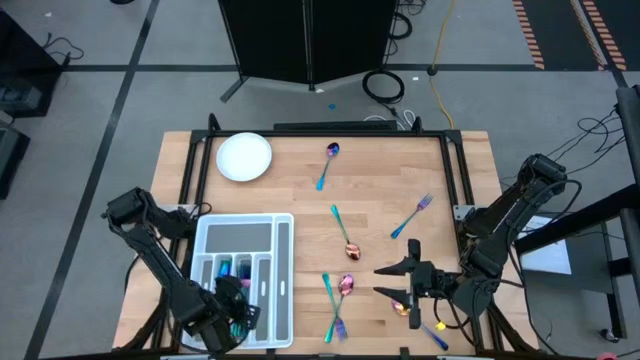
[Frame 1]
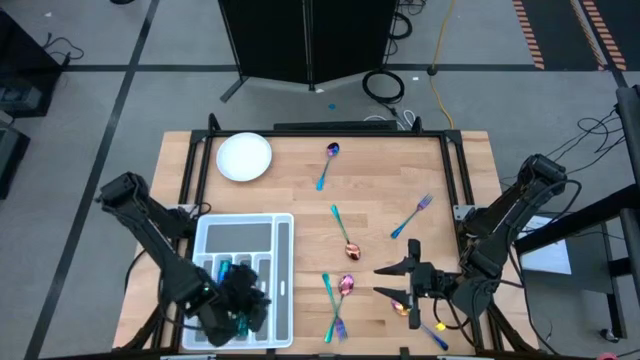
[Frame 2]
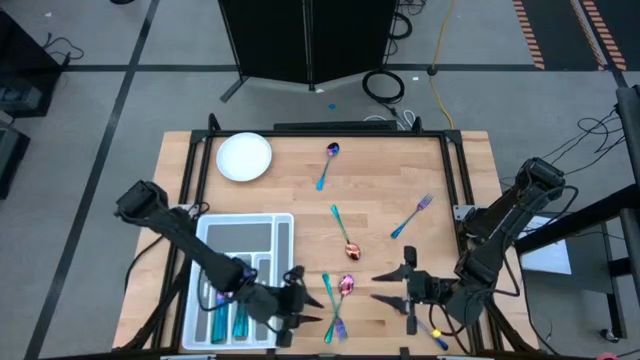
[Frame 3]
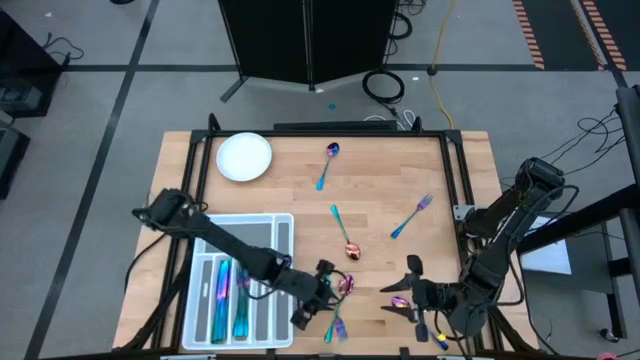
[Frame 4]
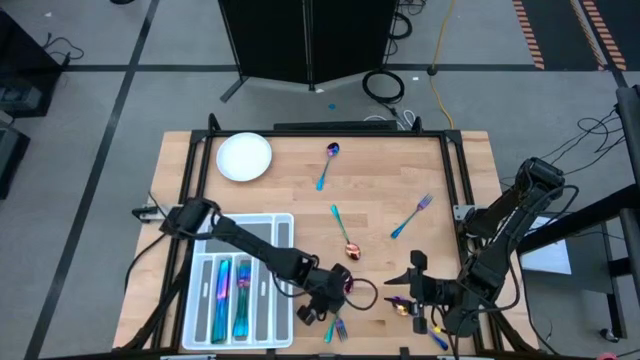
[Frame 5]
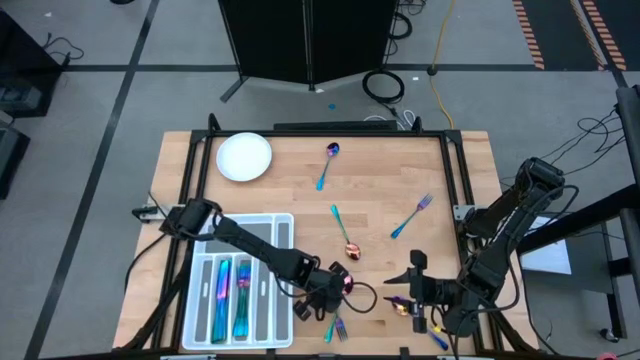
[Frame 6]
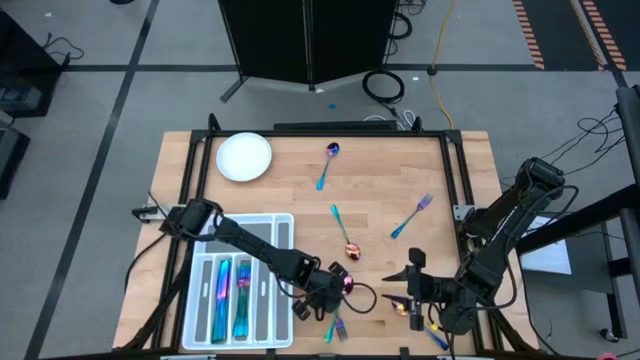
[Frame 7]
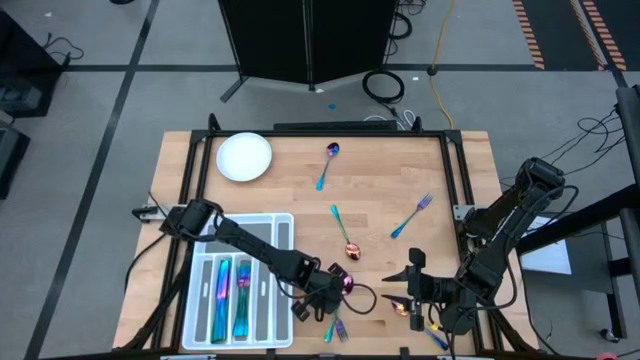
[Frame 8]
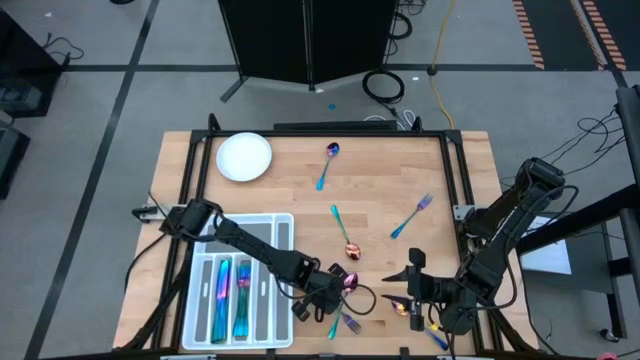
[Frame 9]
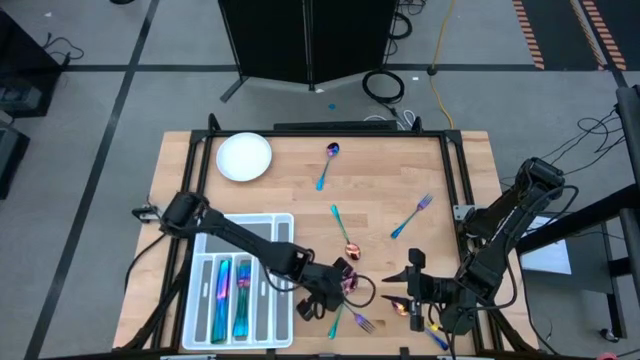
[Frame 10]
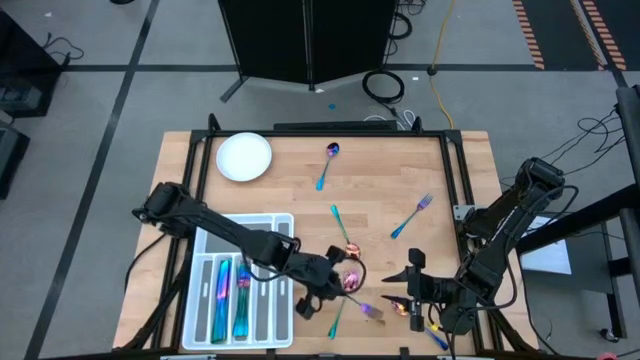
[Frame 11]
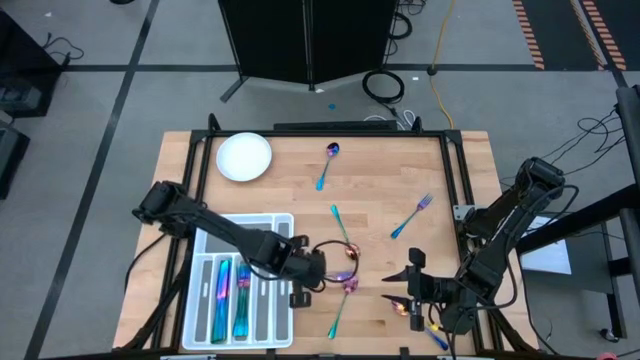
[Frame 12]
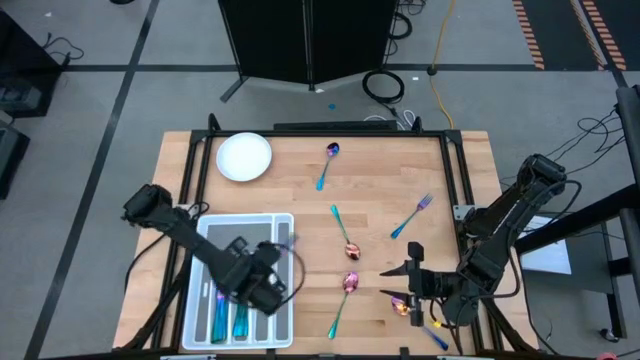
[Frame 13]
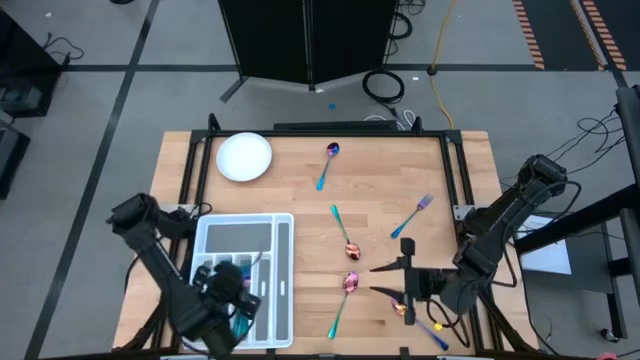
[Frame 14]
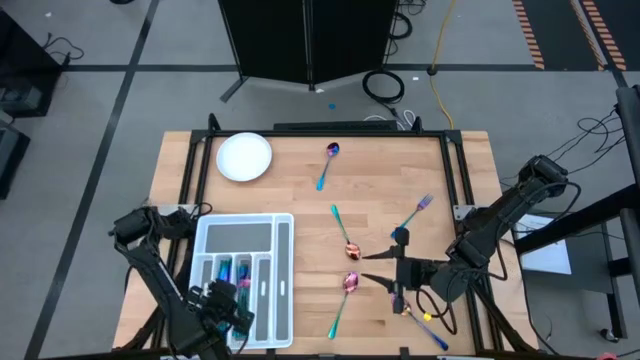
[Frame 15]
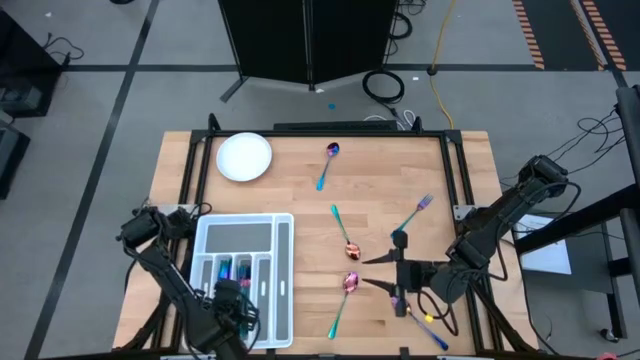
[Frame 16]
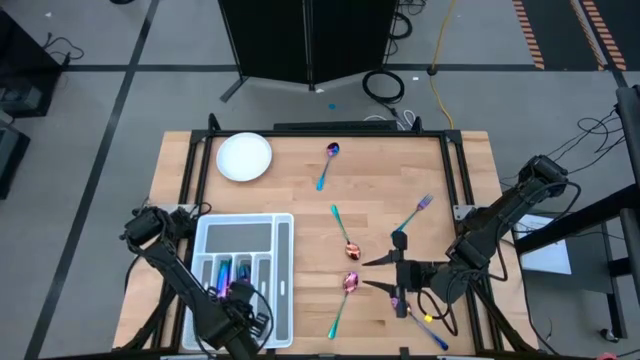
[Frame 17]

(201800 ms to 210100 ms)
Task: Sort silverware
Put the iridescent blue fork in the silverware tray

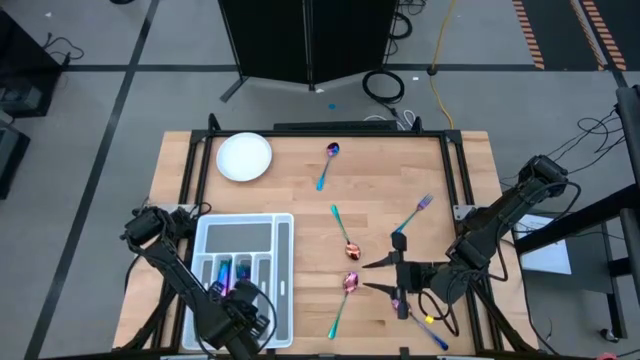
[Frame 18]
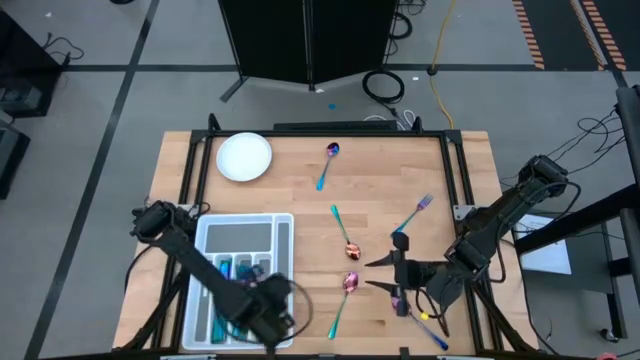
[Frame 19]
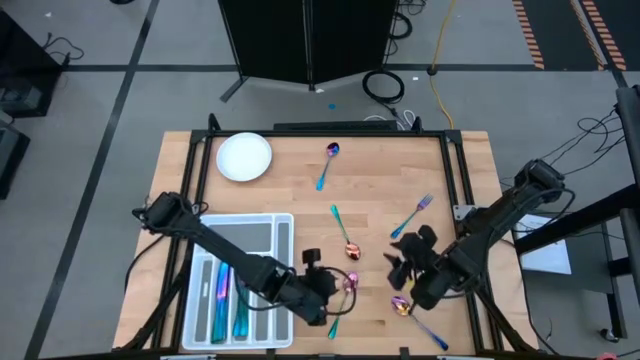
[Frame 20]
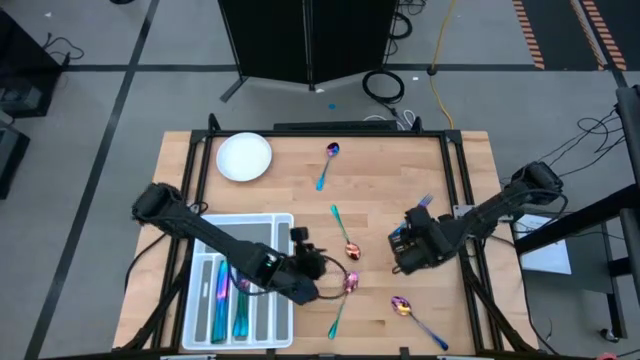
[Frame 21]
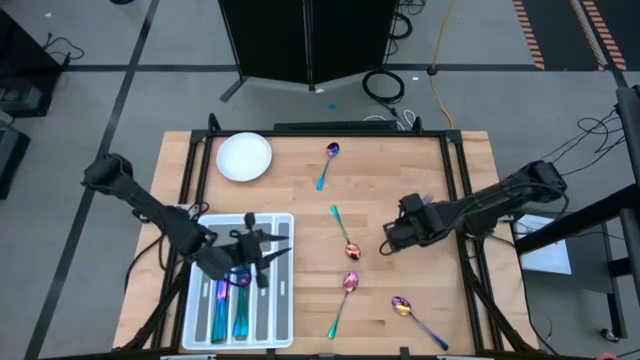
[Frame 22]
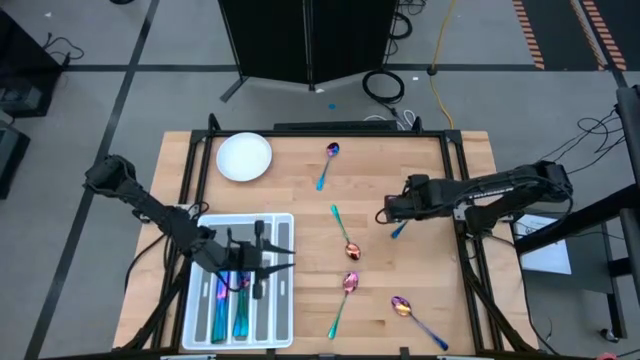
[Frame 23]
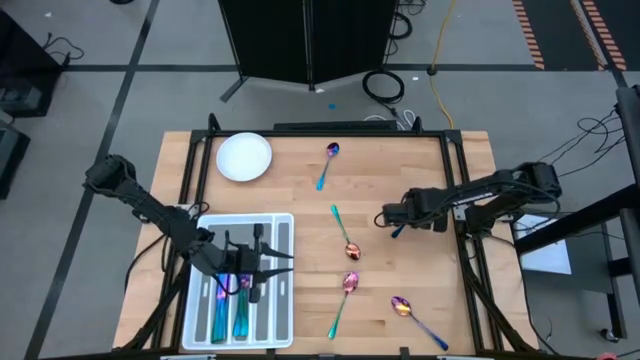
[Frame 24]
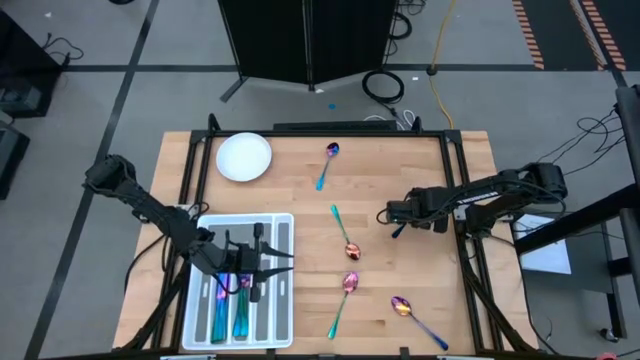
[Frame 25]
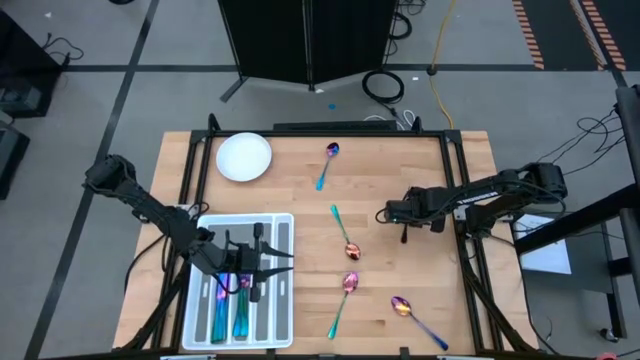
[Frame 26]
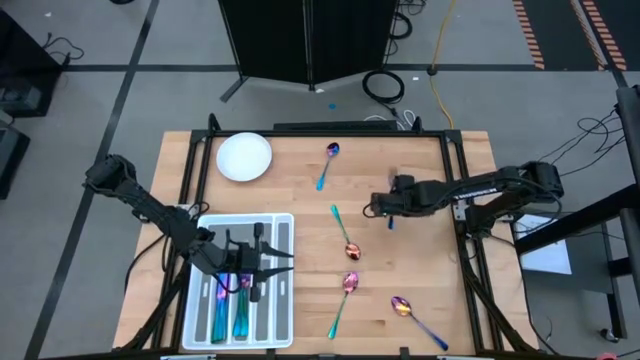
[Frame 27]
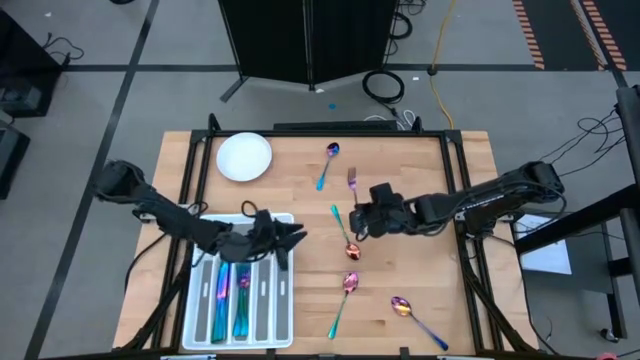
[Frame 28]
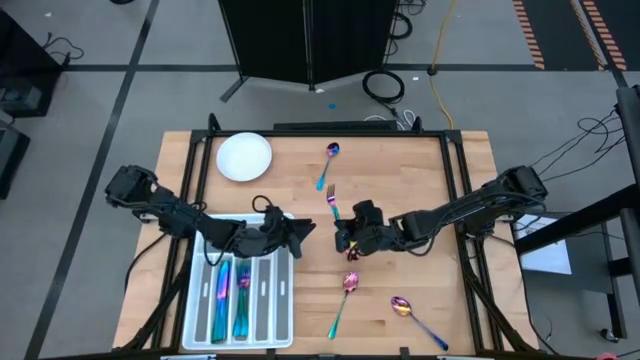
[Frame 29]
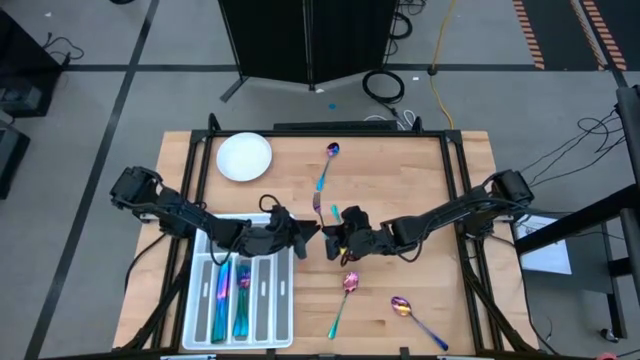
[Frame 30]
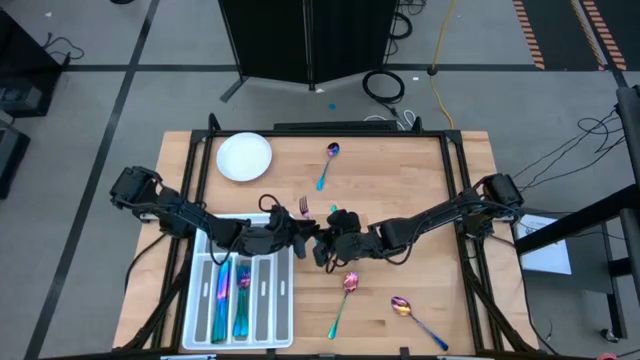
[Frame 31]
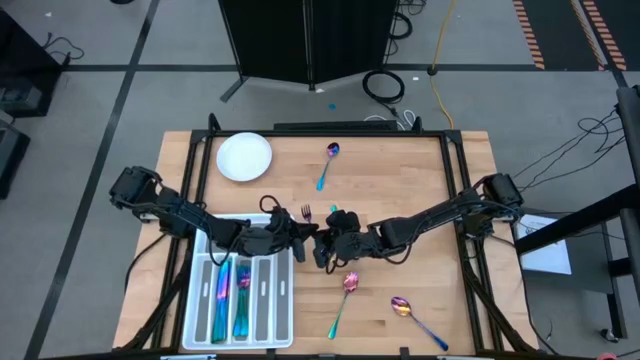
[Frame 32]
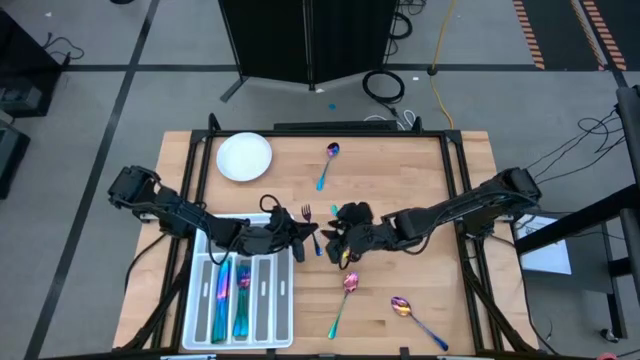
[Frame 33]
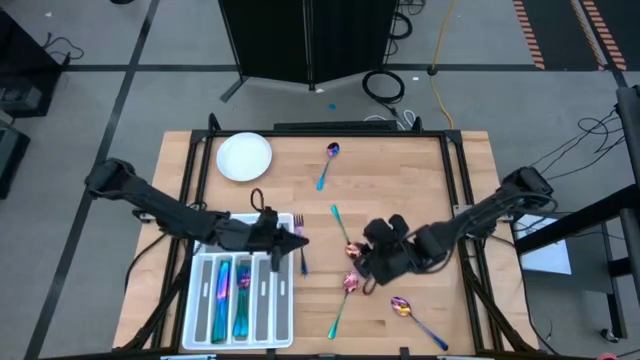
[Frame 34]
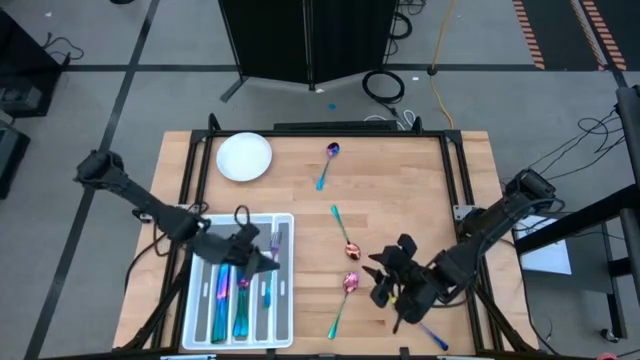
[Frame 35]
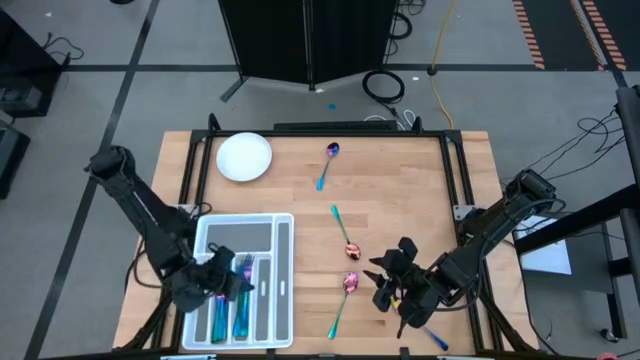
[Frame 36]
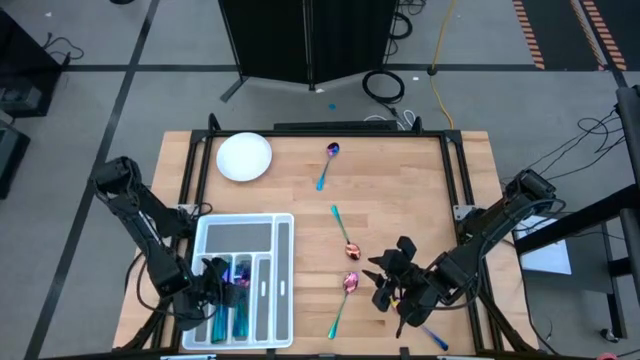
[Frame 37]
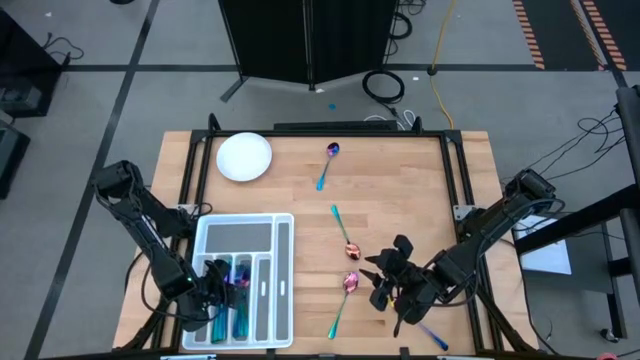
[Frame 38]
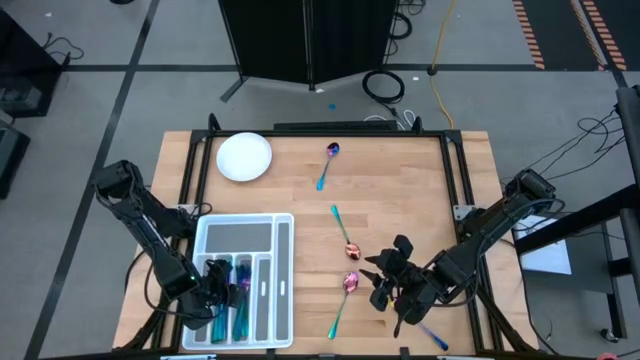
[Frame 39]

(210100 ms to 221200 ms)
Put the iridescent blue fork in the silverware tray

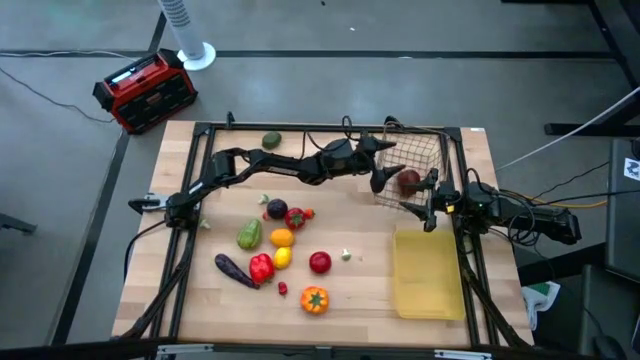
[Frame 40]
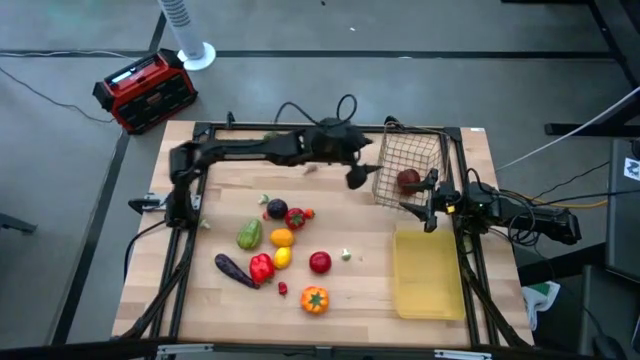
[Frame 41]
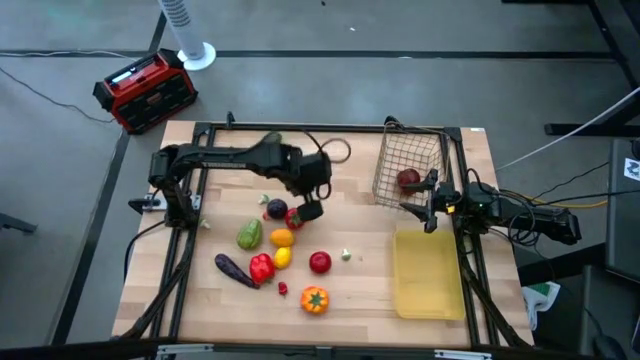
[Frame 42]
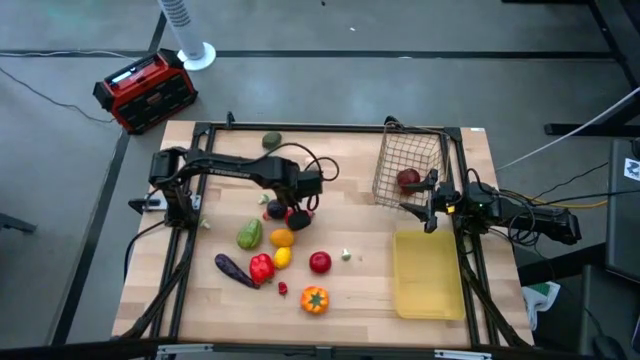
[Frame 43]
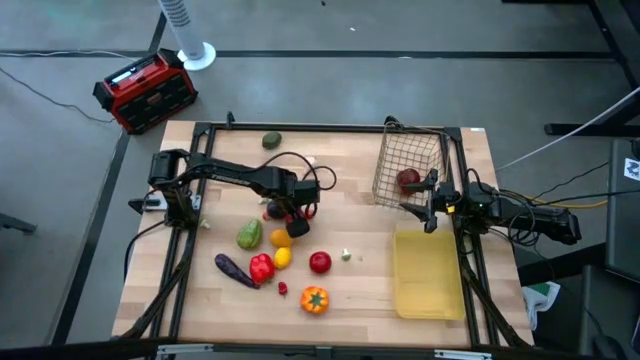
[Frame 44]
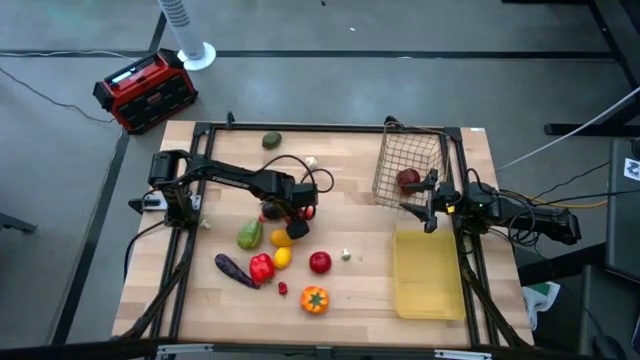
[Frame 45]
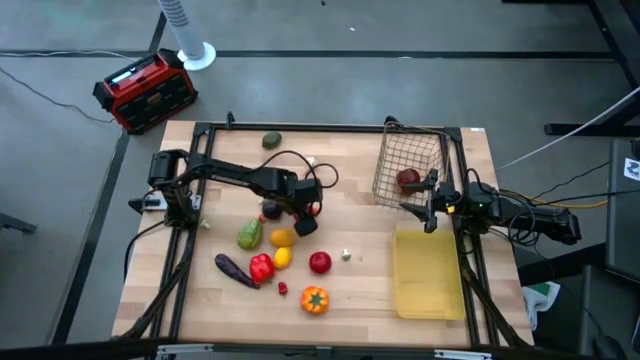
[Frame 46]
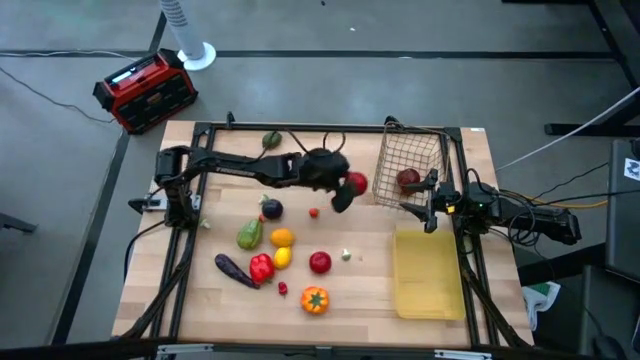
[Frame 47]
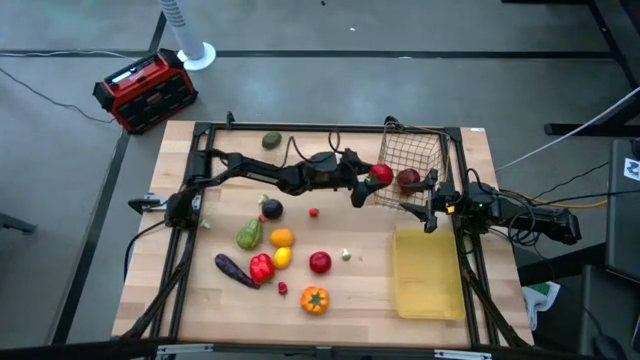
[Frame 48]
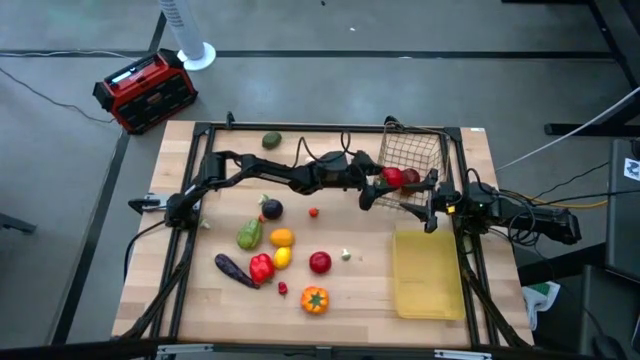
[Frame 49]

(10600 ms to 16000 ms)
Task: Sort produce into baskets
Put the top red tomato into the wired basket
